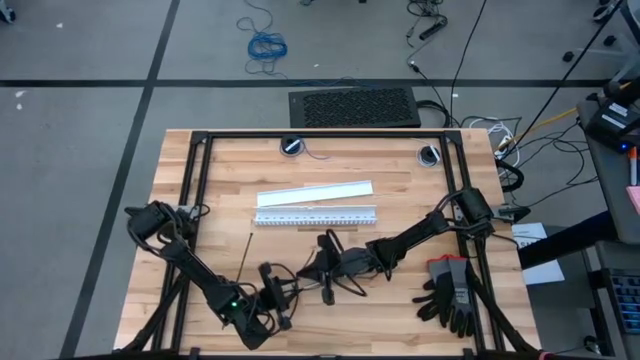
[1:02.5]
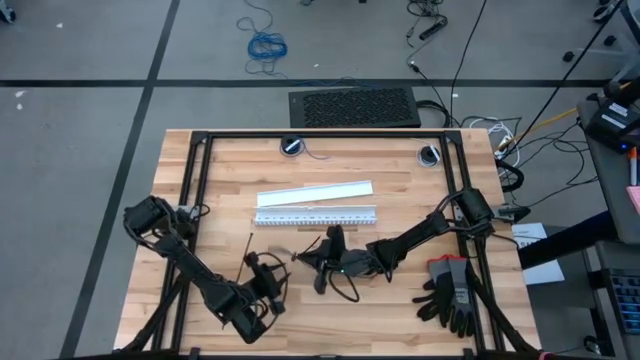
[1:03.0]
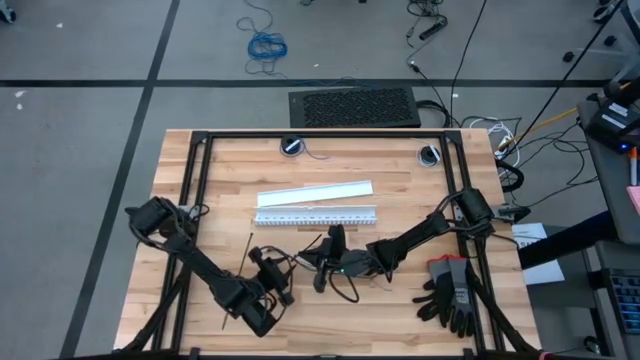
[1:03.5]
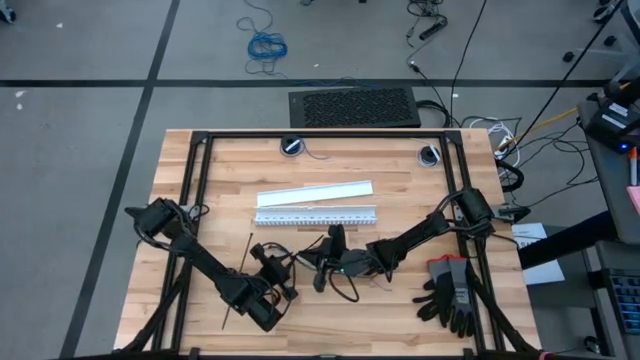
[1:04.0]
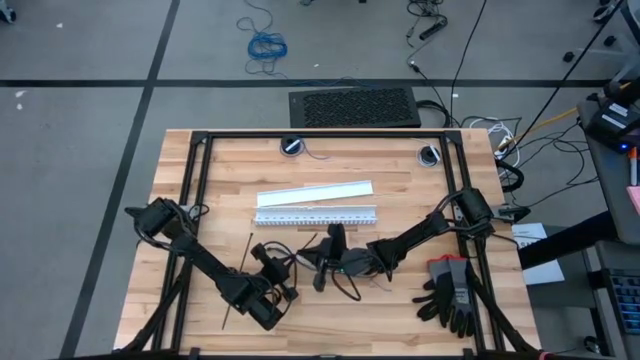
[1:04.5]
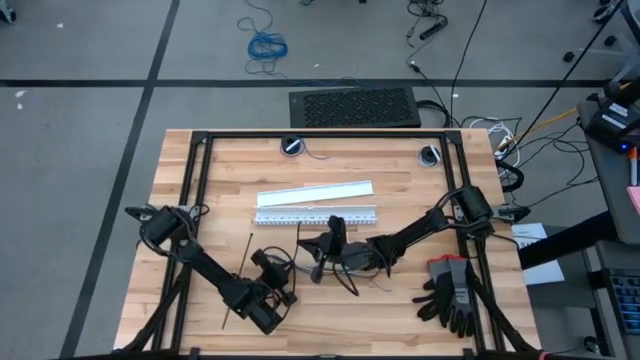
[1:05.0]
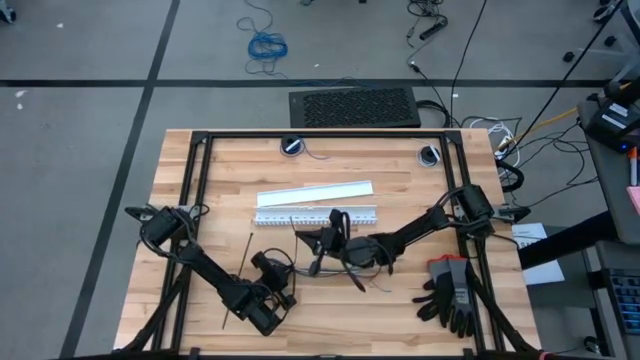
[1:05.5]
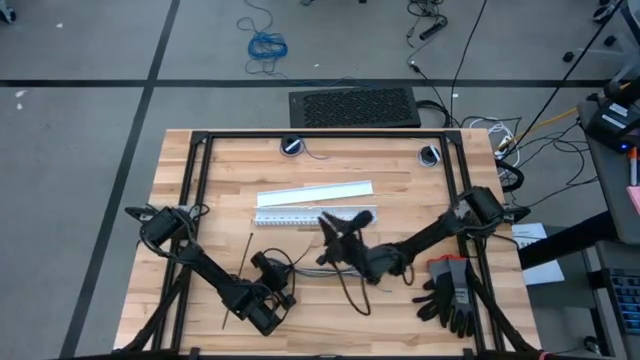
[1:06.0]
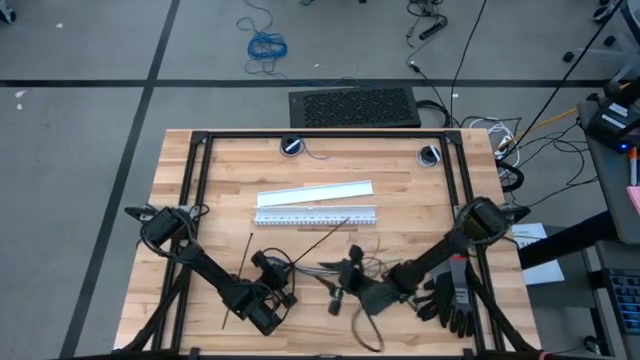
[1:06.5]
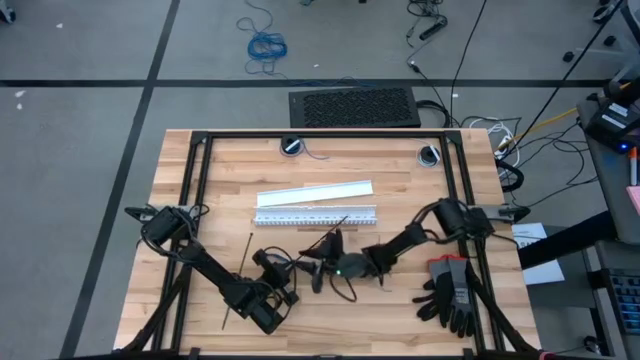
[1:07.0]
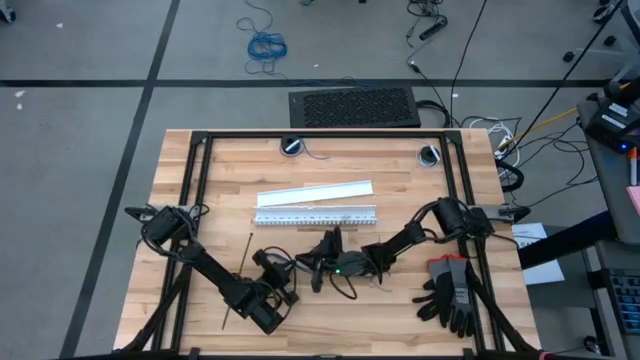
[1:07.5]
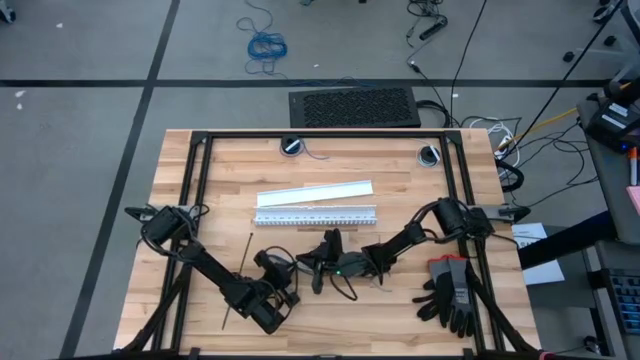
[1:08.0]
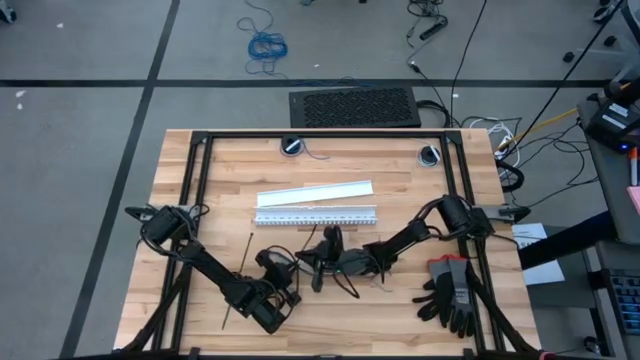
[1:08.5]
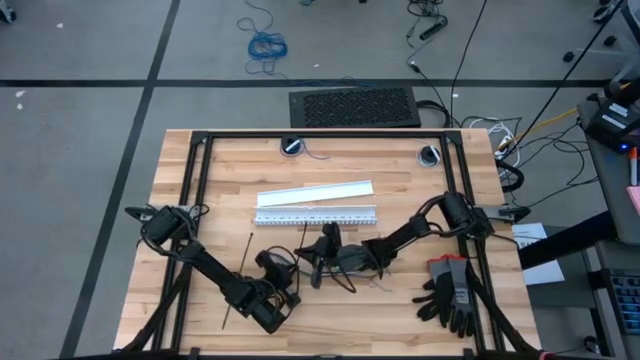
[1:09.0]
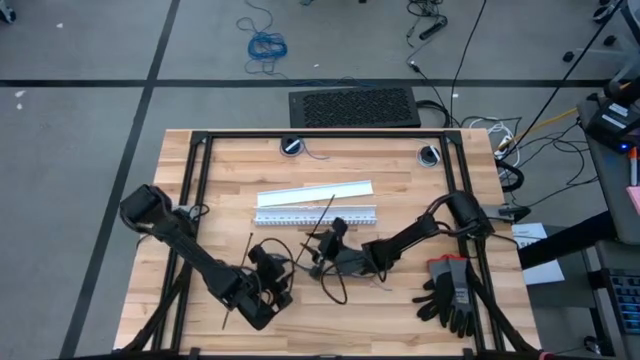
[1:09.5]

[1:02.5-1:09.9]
Task: Ziptie cables
Wrap the left black zip tie around the colored cable wires

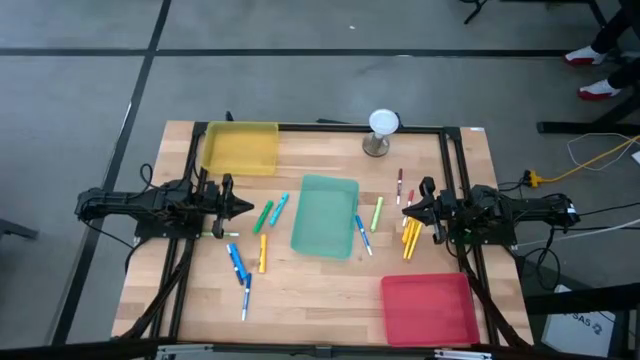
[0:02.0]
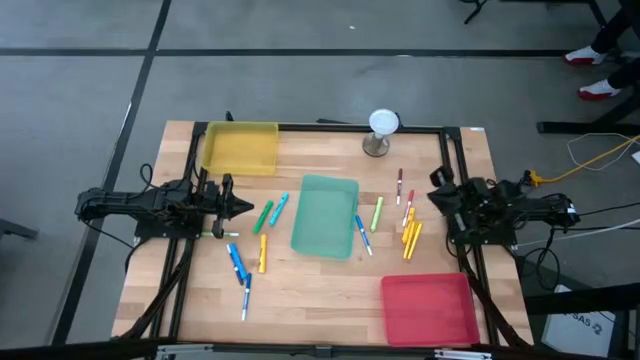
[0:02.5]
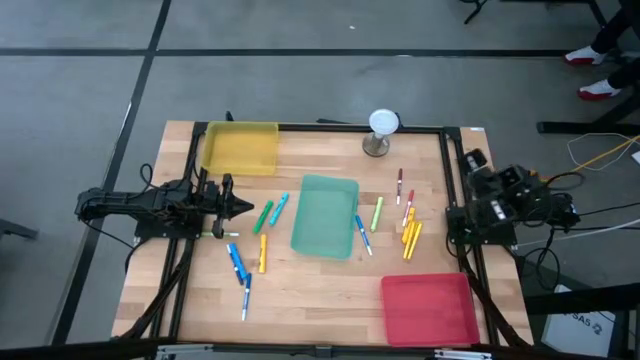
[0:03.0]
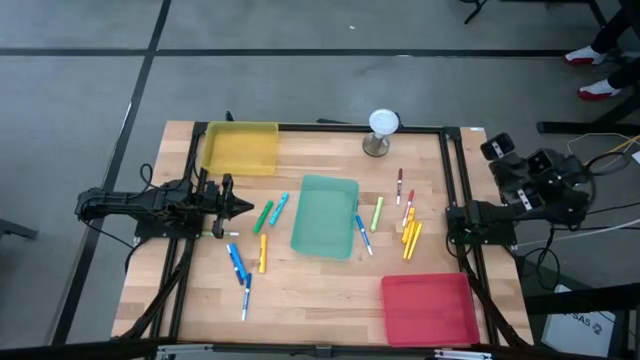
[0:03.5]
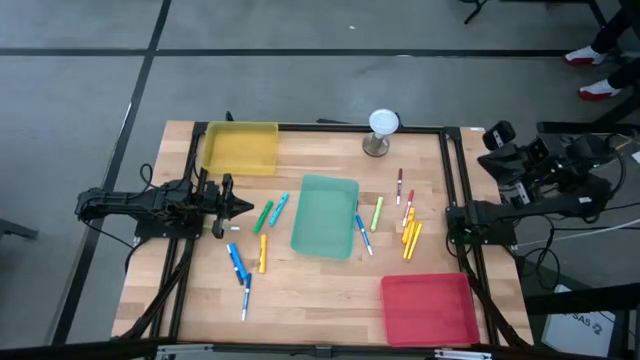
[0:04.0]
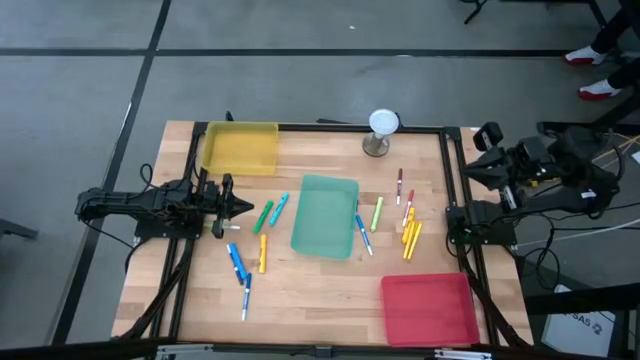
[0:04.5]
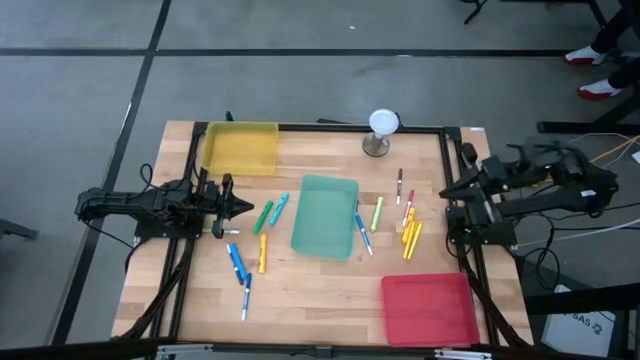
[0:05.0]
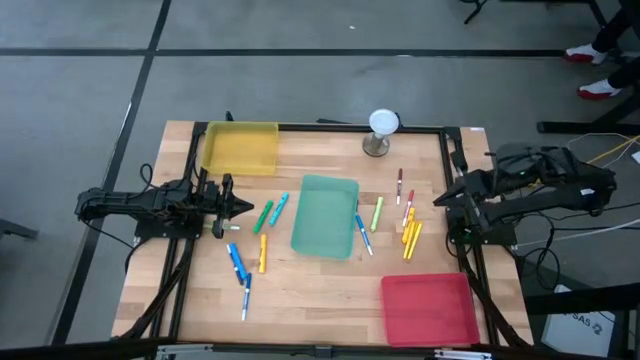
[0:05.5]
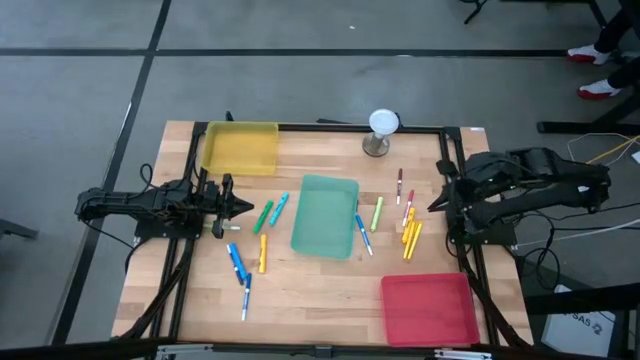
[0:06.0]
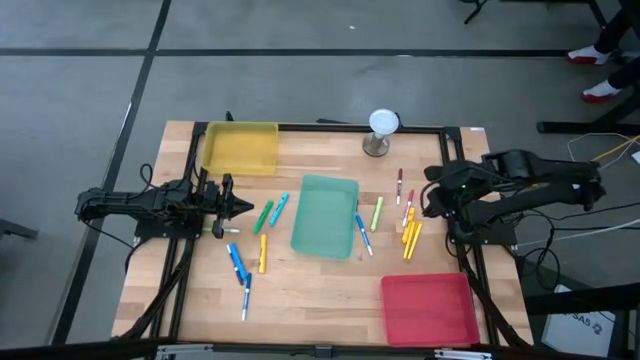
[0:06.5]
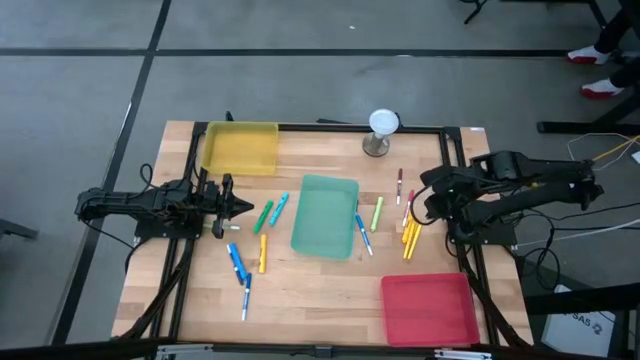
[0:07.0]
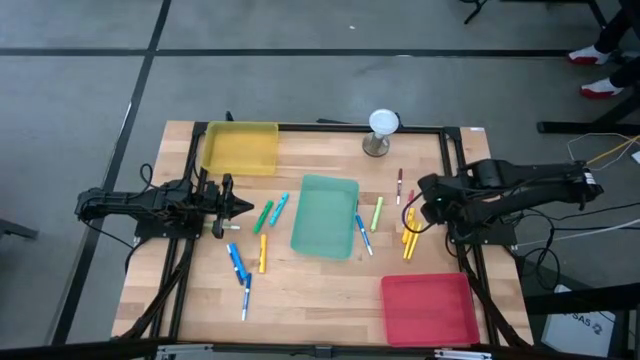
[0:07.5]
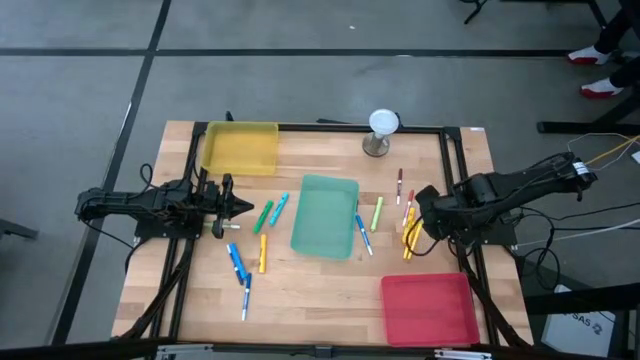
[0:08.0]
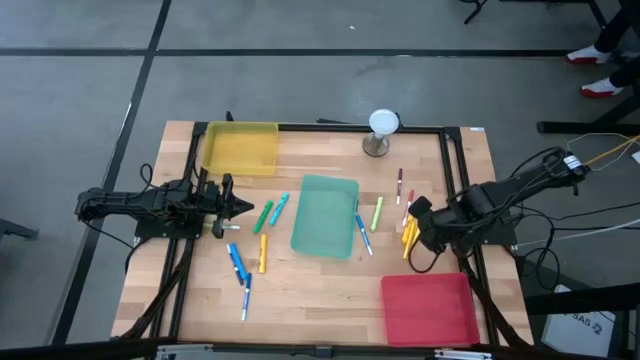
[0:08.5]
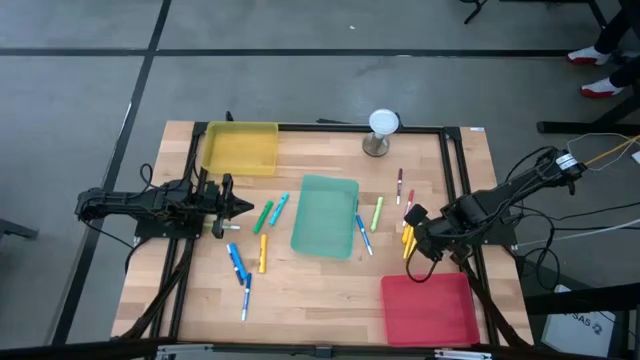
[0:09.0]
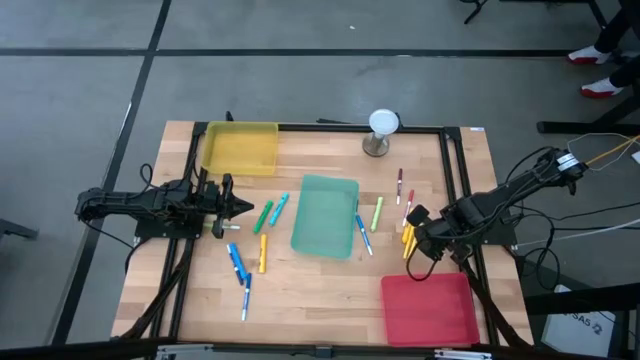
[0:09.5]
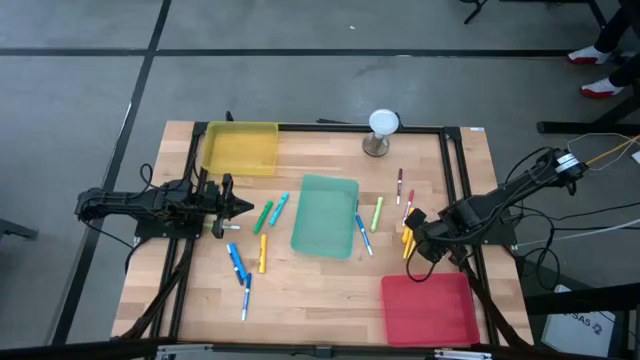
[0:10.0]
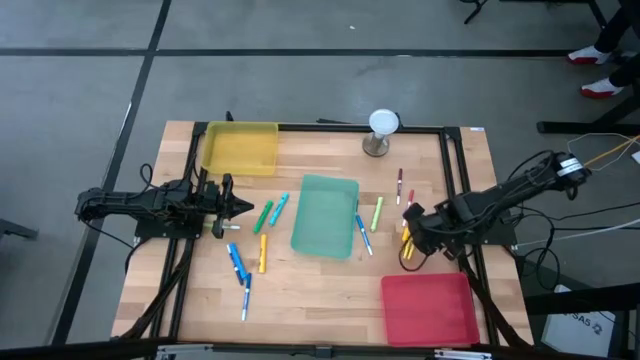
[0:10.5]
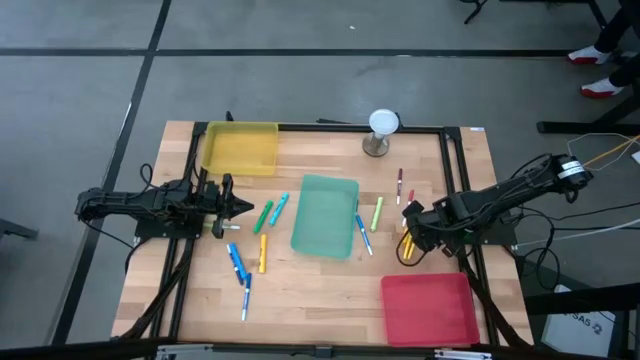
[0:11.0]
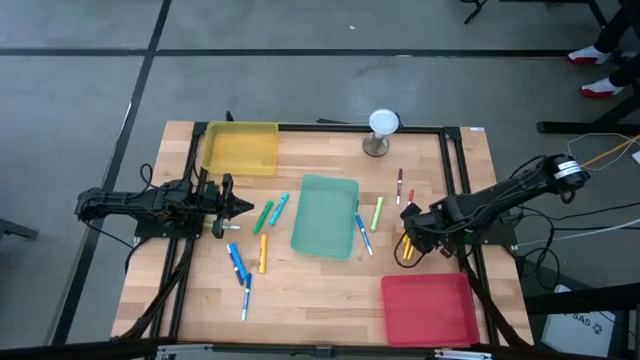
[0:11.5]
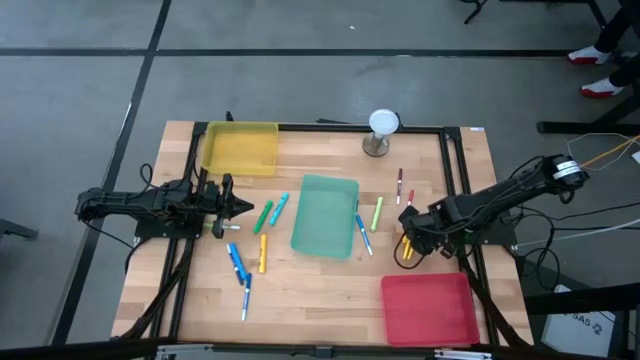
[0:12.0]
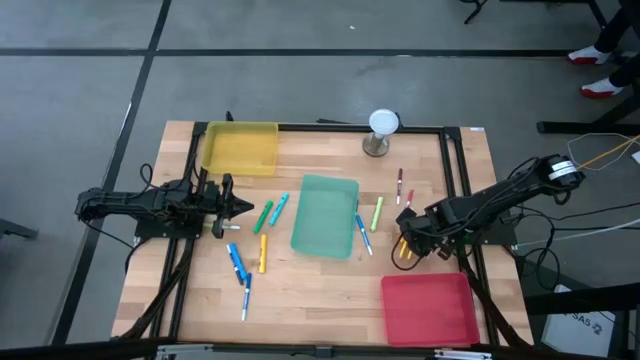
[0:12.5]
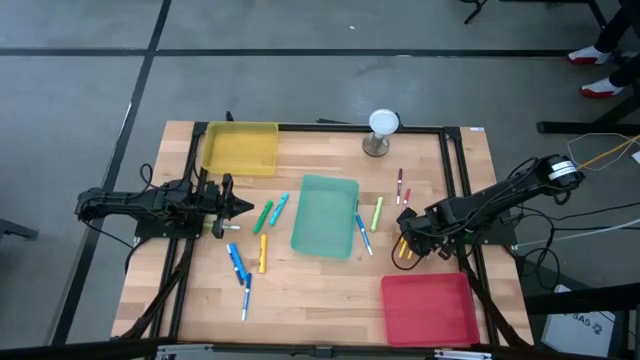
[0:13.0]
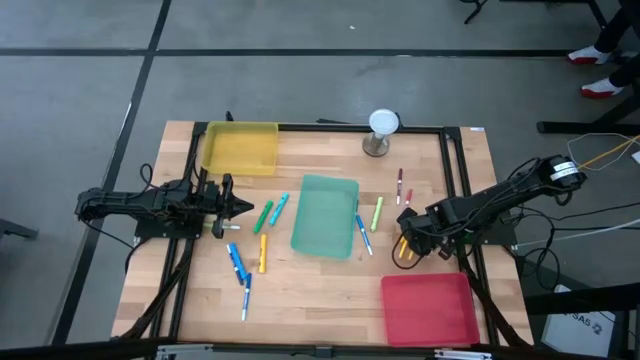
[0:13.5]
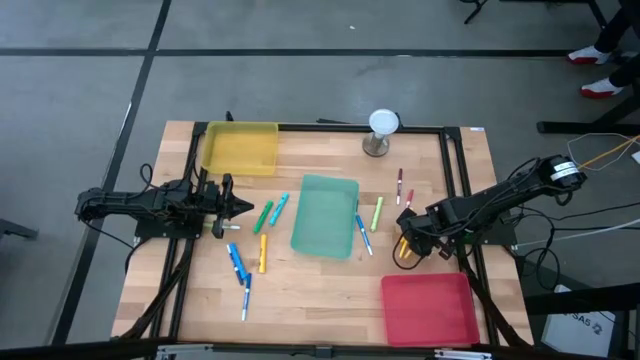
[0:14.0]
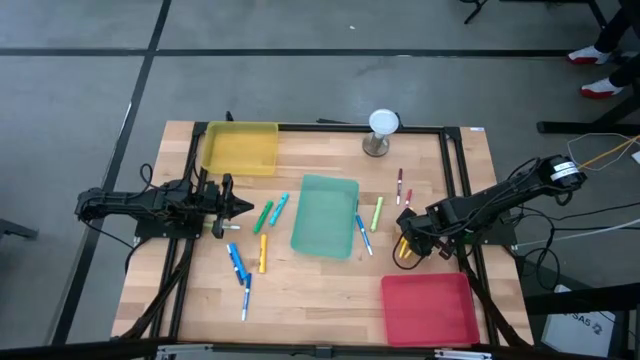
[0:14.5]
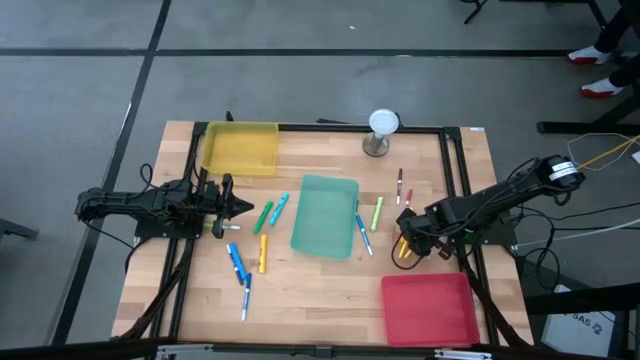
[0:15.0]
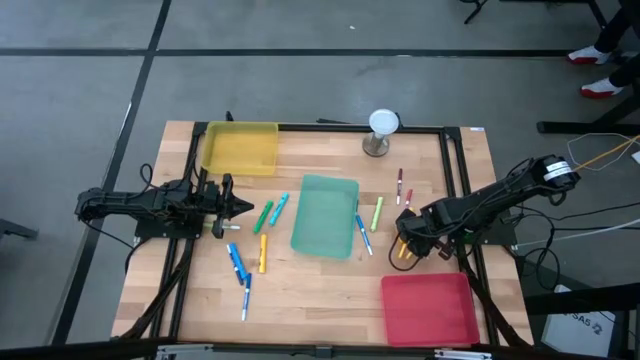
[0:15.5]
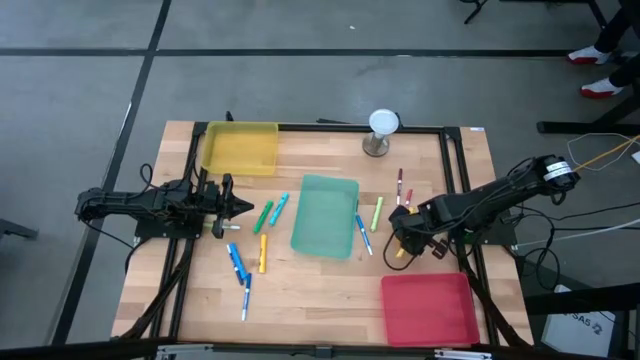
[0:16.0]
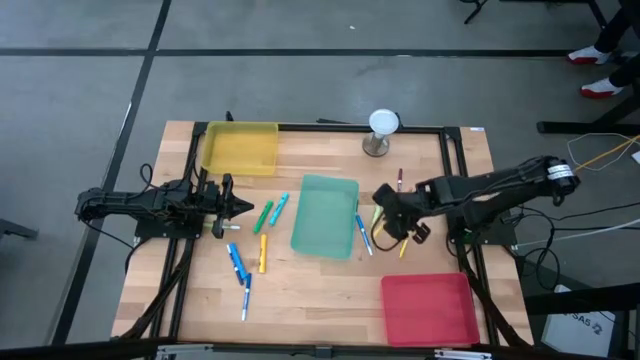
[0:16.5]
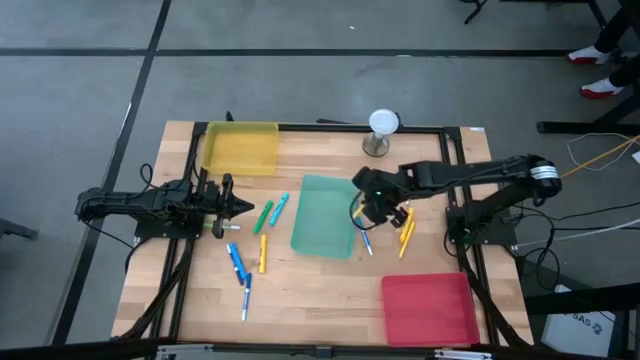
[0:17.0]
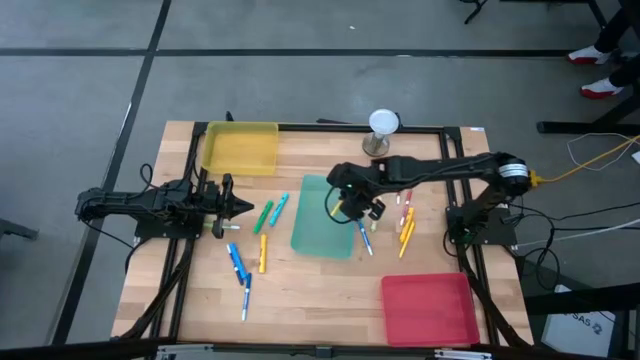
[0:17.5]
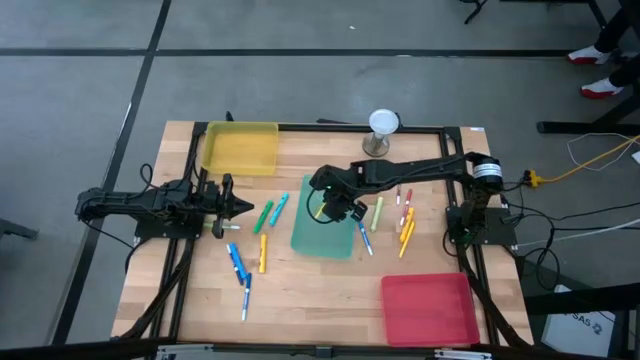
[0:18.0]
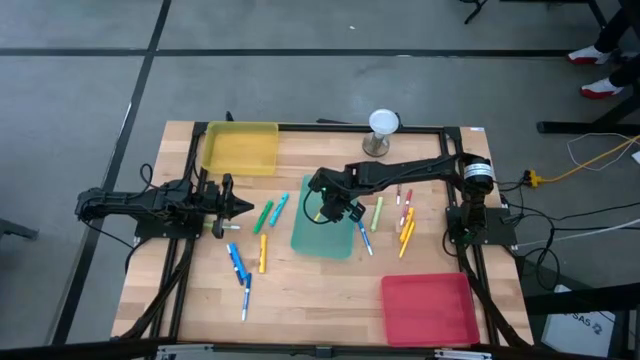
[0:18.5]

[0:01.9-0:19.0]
Task: Pick & Place Markers
Put the right yellow pen into the green bin
